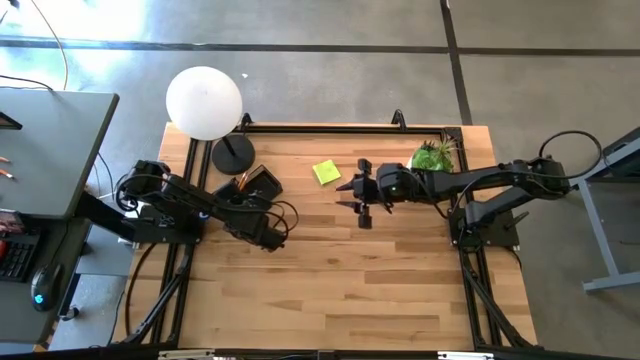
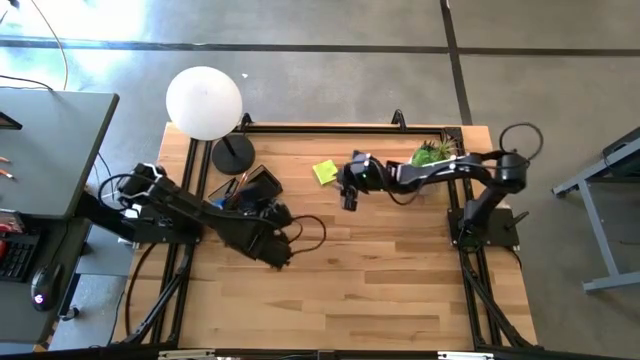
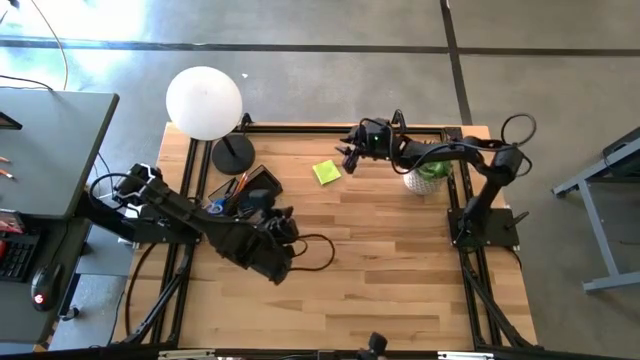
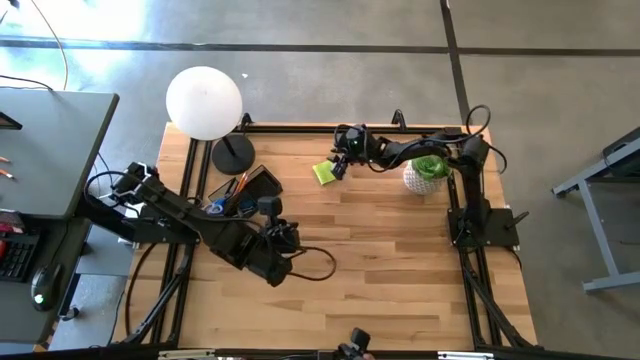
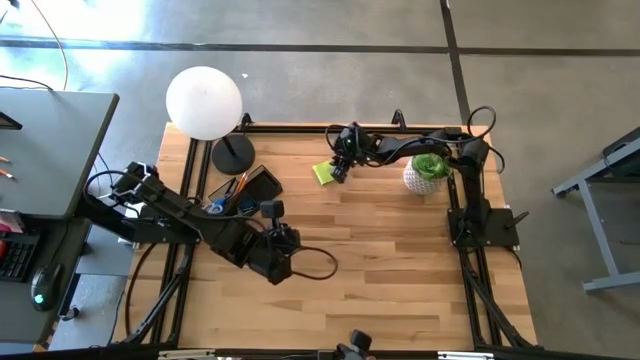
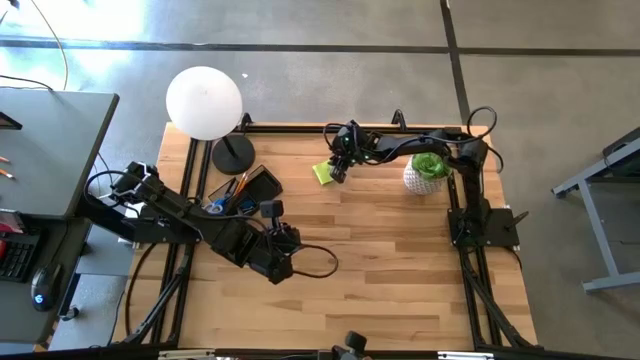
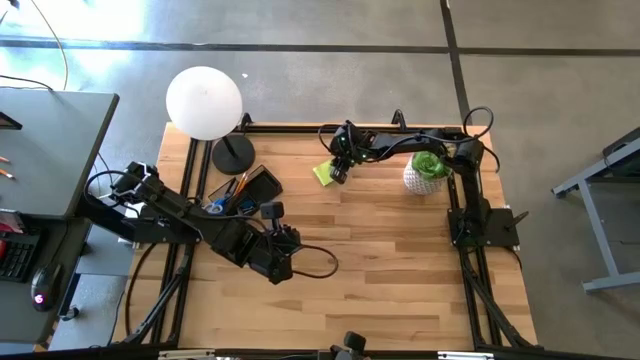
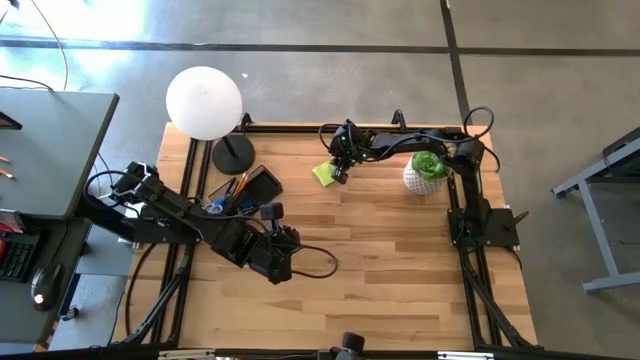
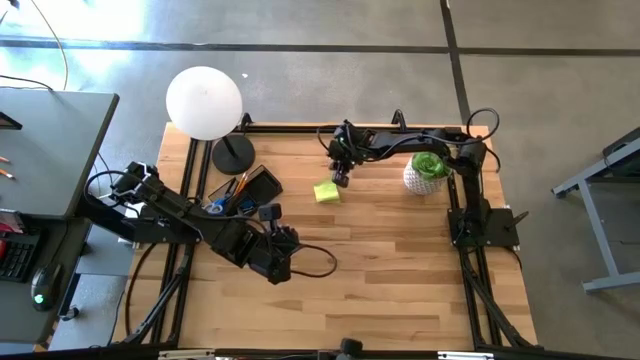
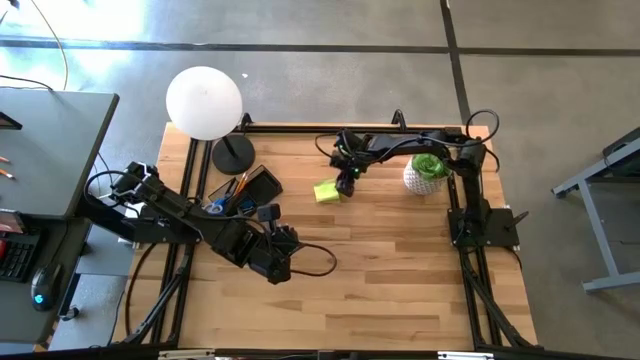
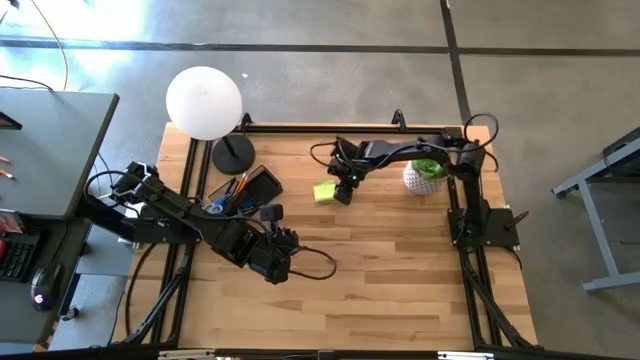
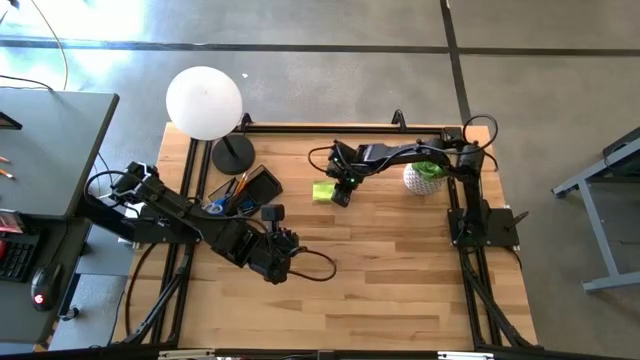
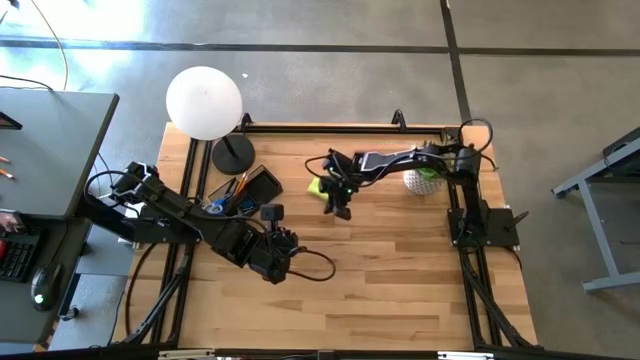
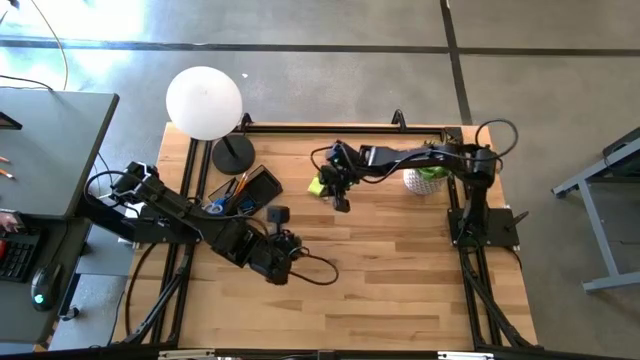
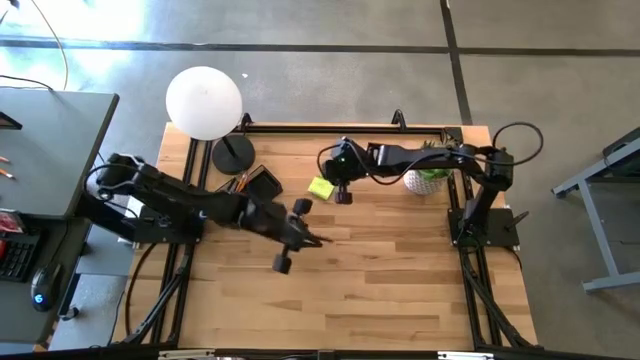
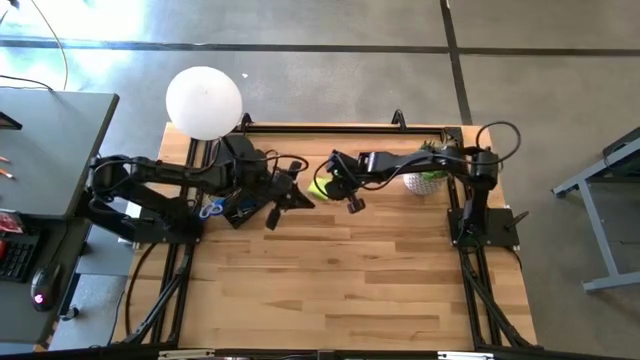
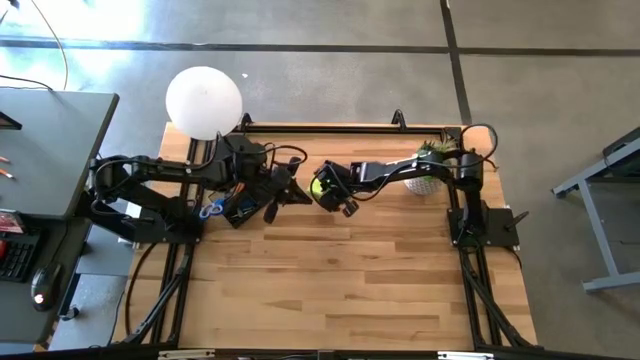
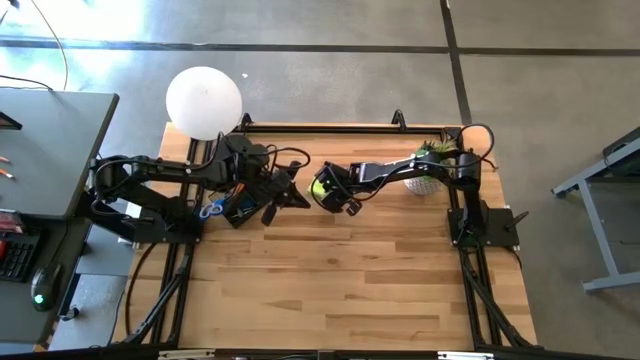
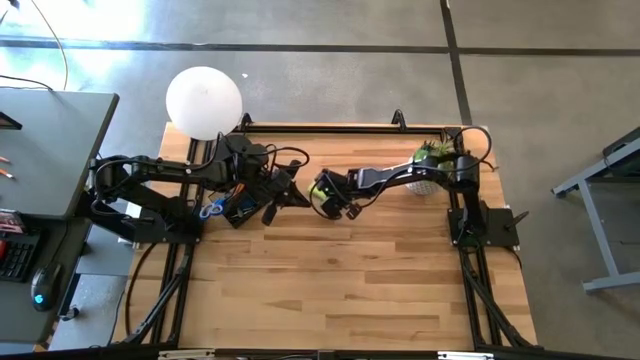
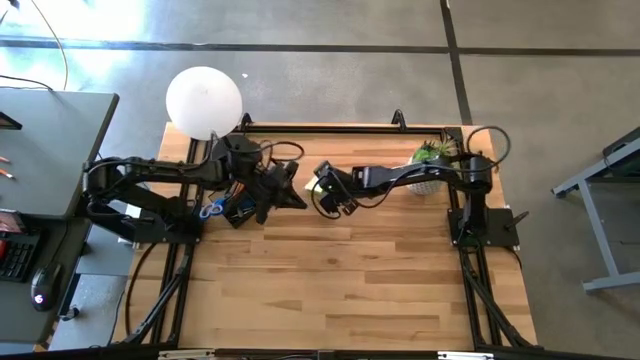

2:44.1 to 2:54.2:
Task: Pick and place office supplies into organizer
Put the green notepad into the black mesh desk organizer

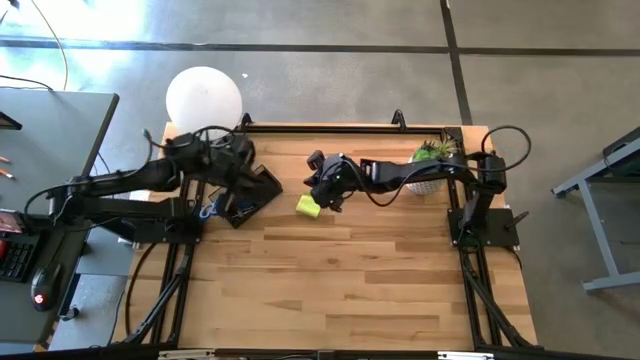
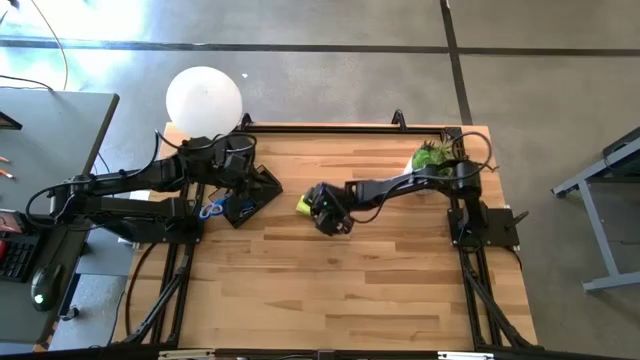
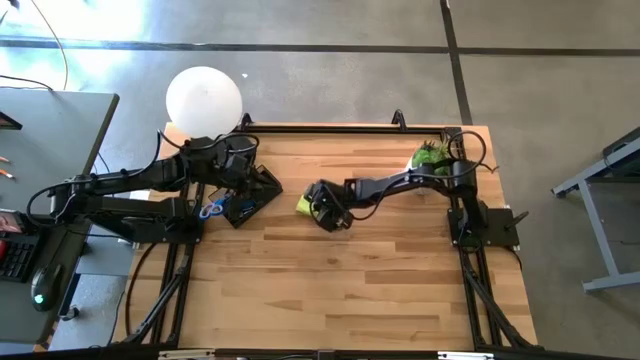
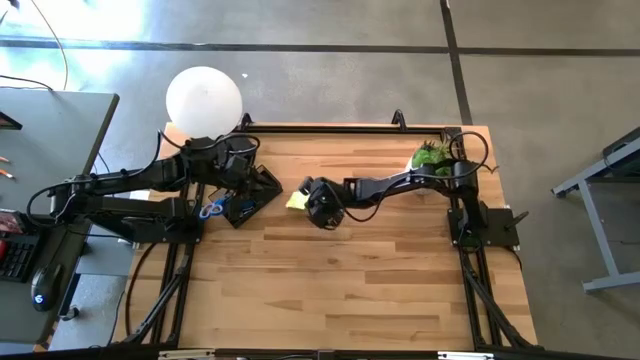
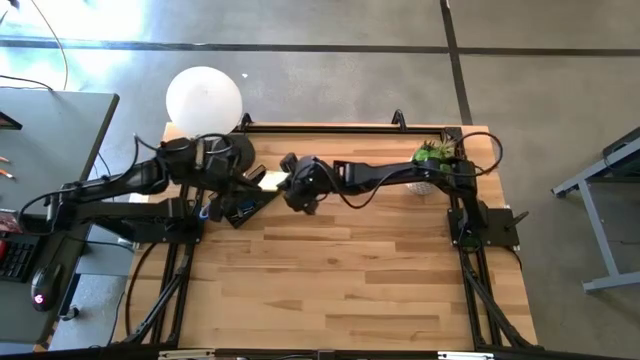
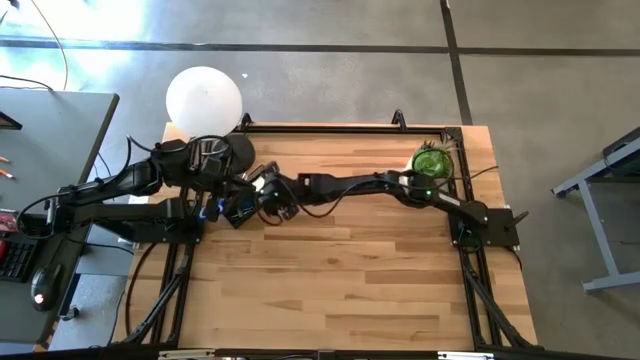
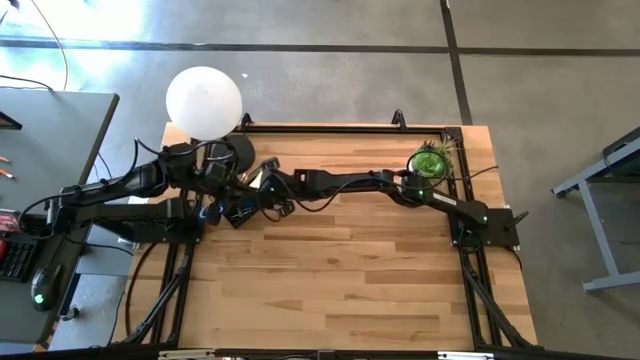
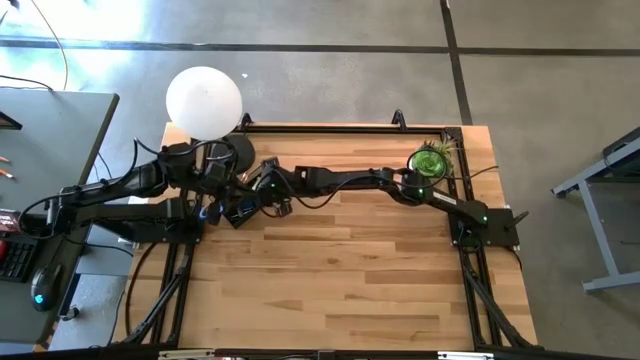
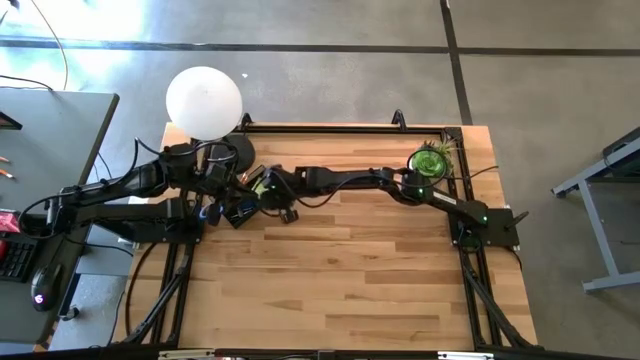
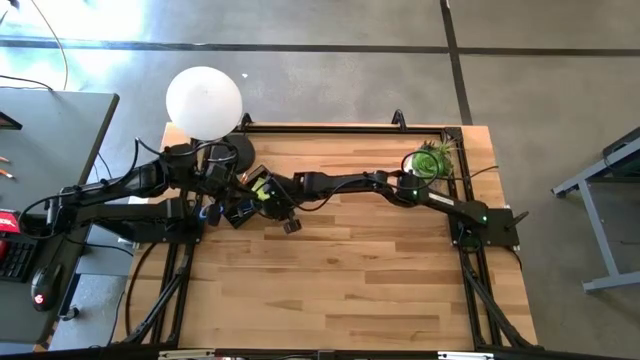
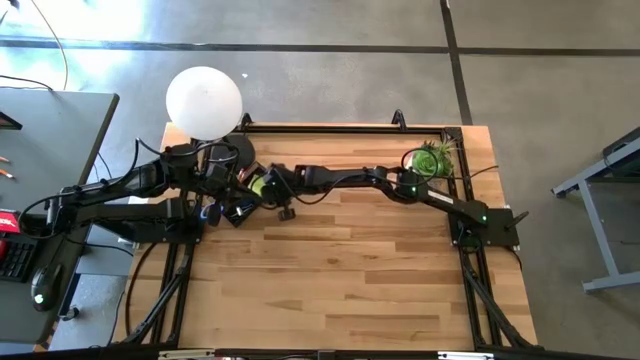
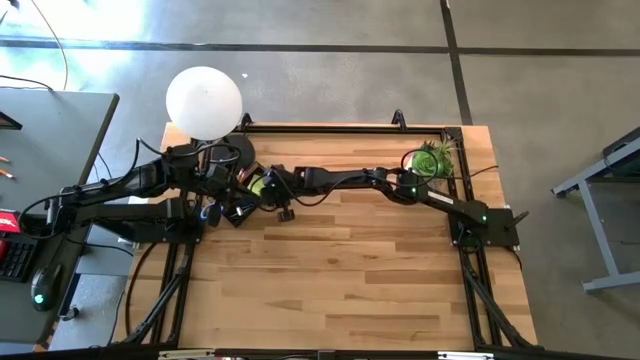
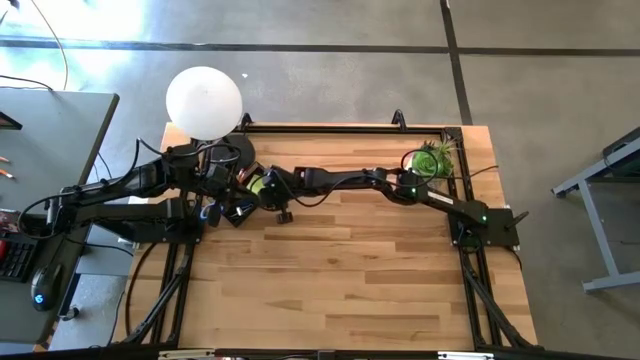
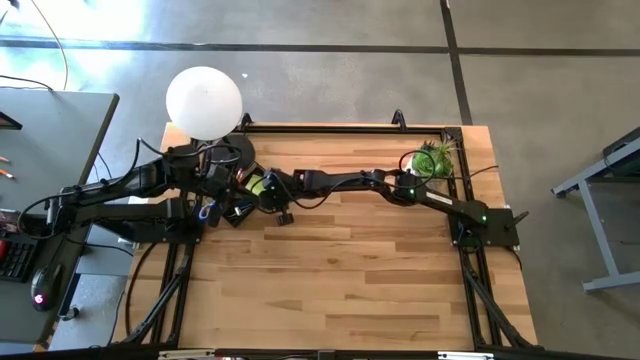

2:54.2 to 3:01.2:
Put the green notepad into the black mesh desk organizer

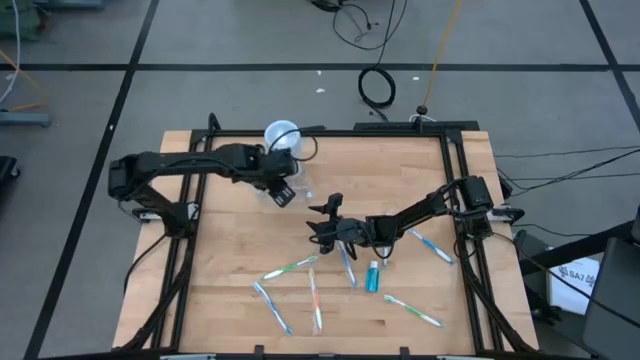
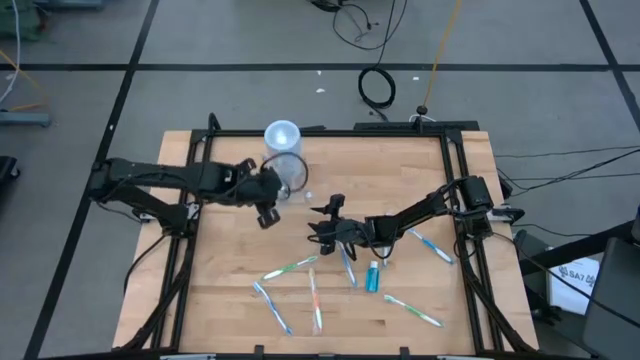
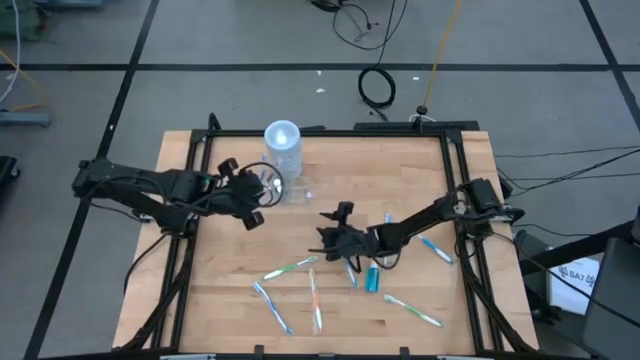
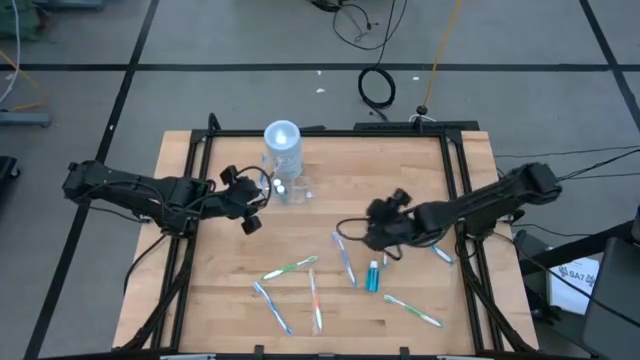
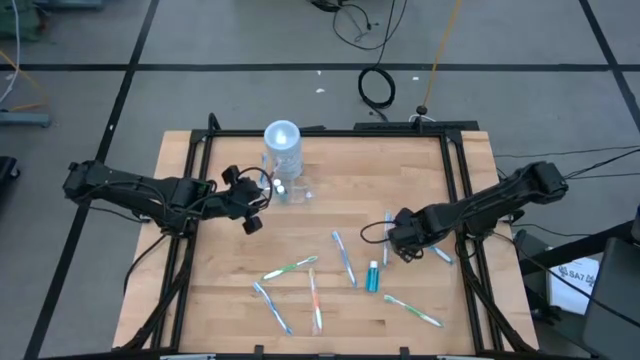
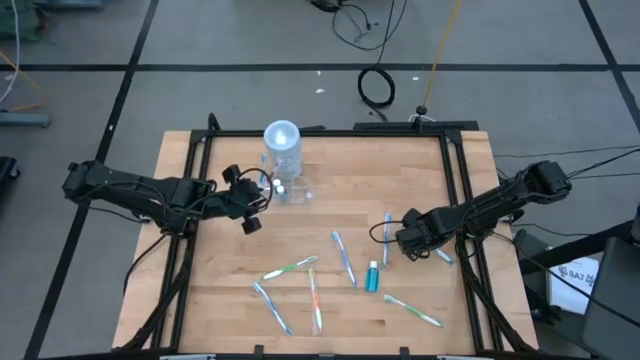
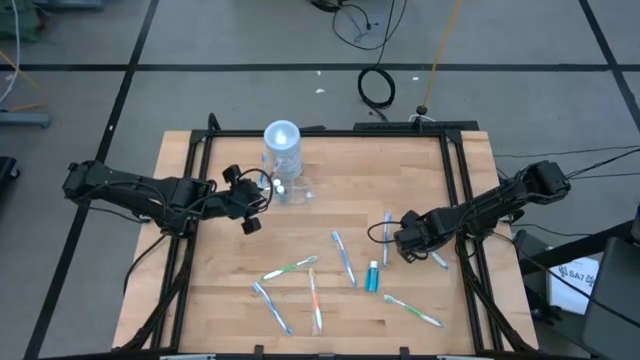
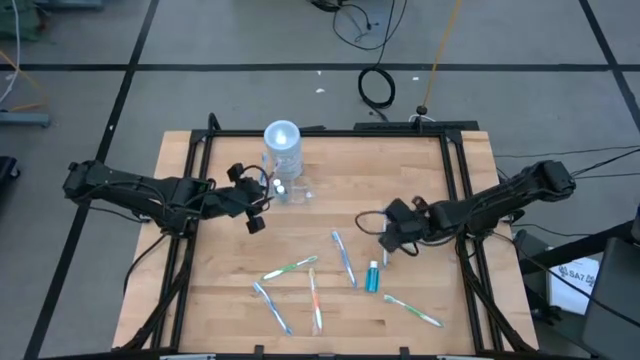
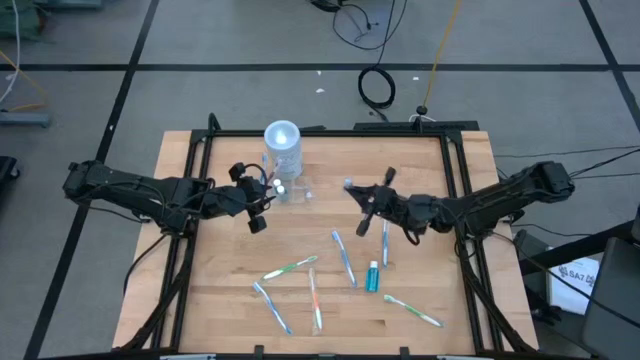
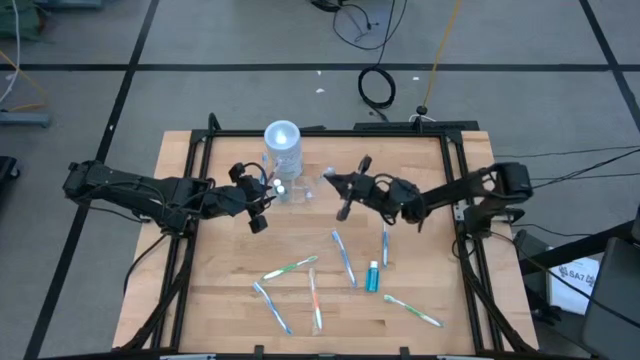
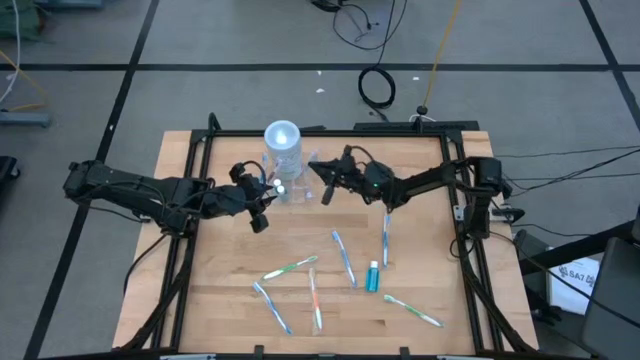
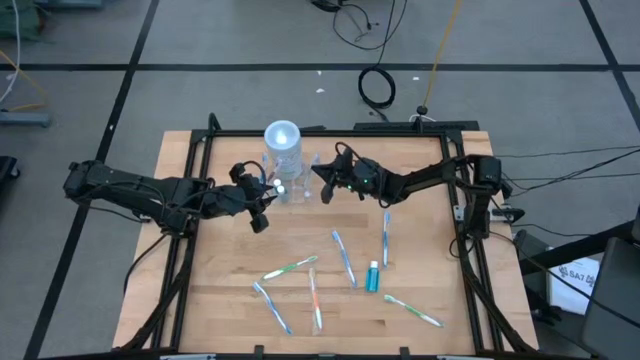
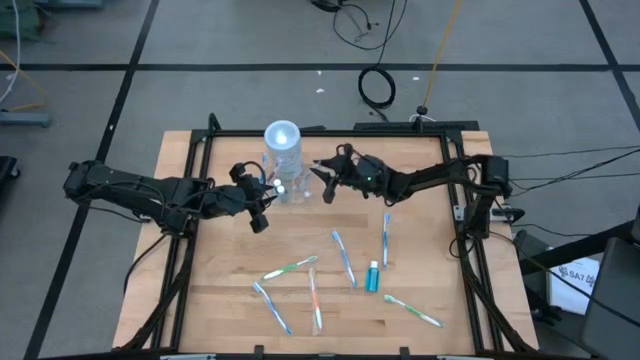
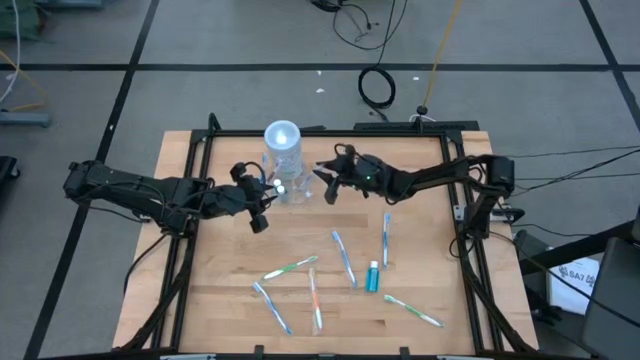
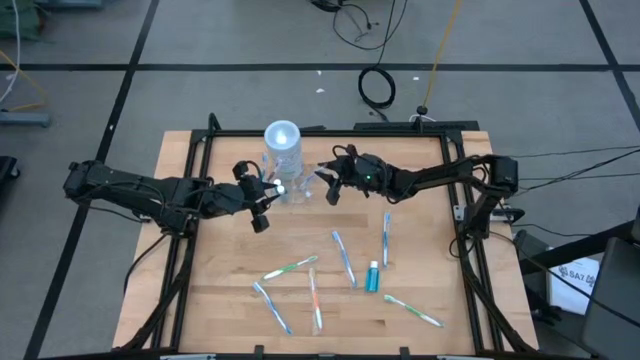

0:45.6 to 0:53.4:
Task: Pick & Place toothbrushing station
Put the blue toothbrush into the transparent organizer
